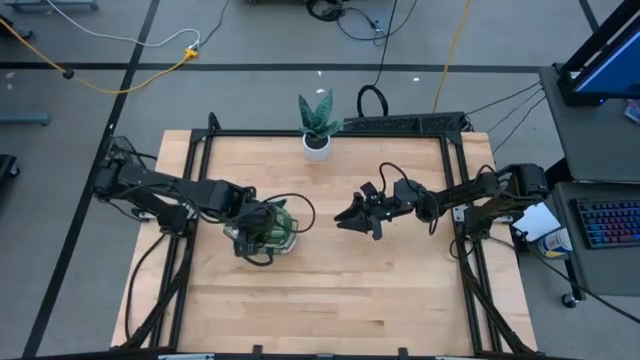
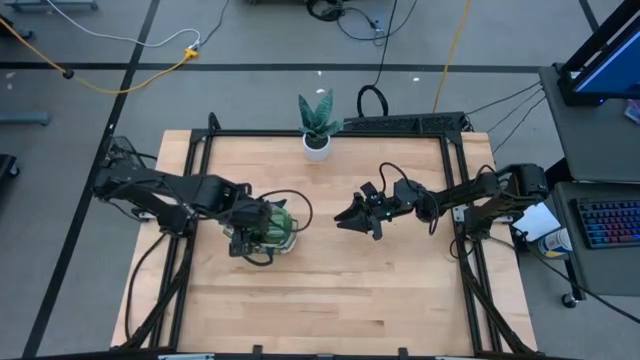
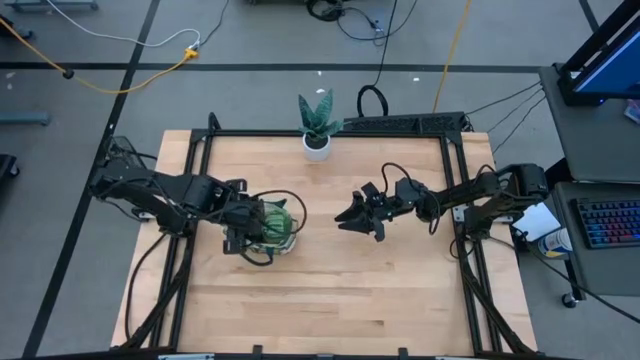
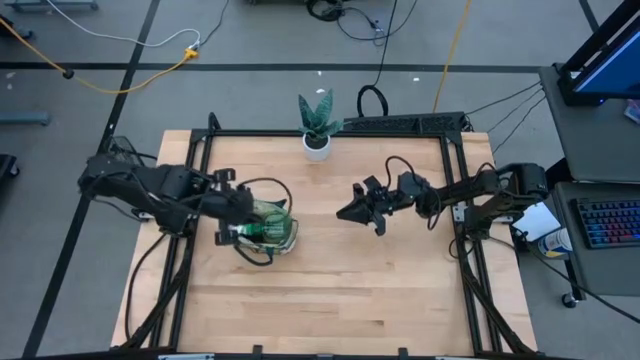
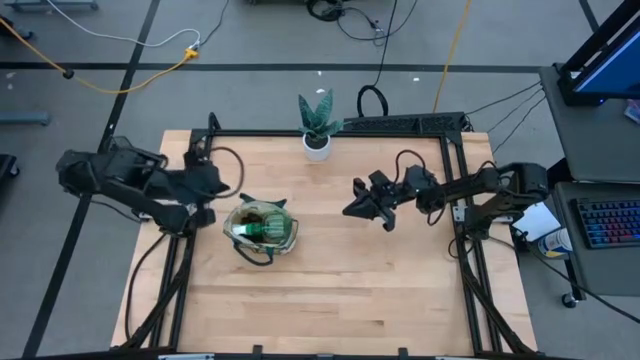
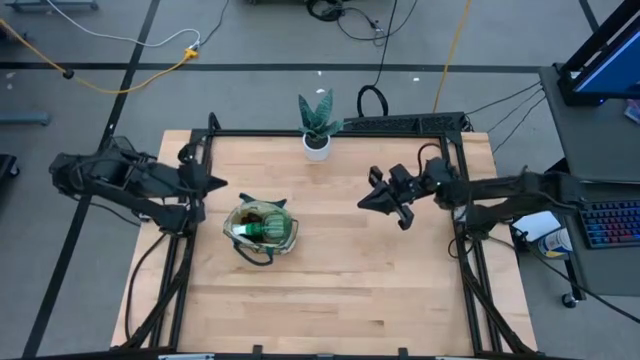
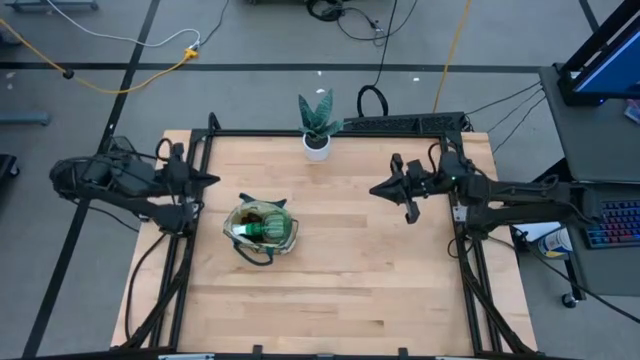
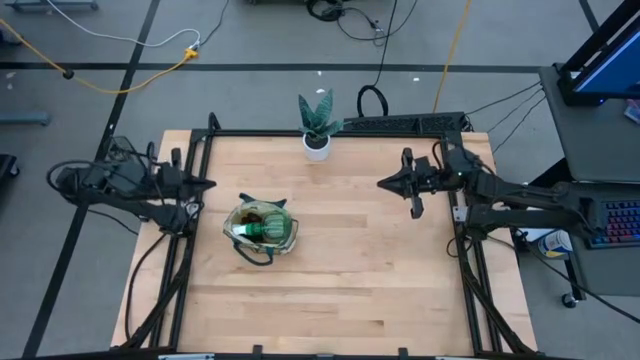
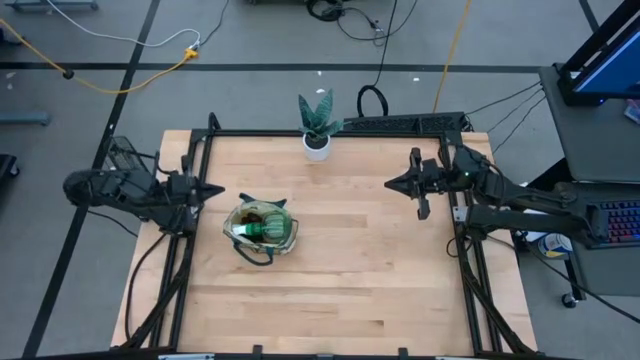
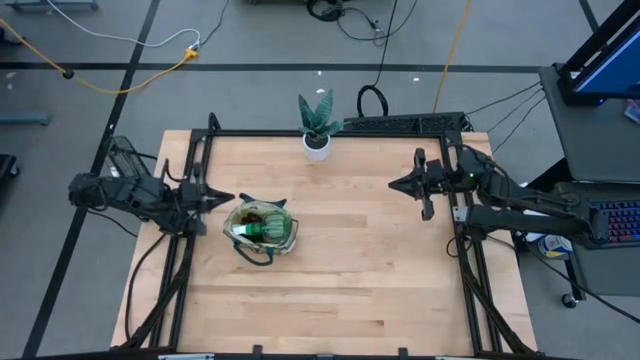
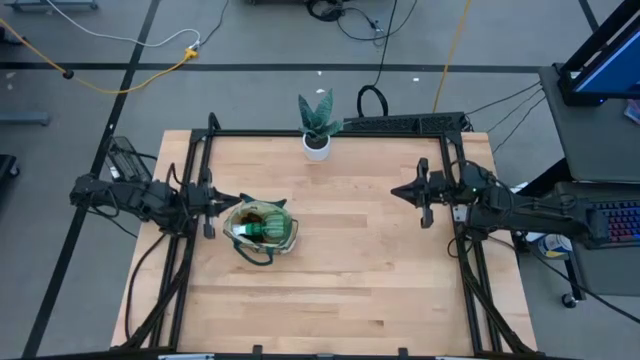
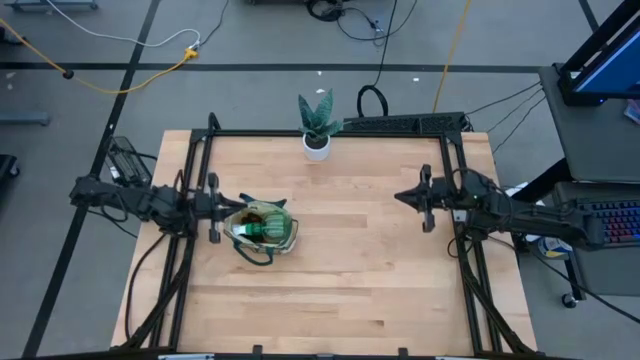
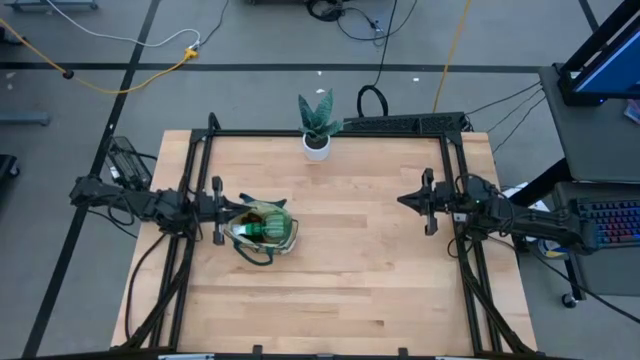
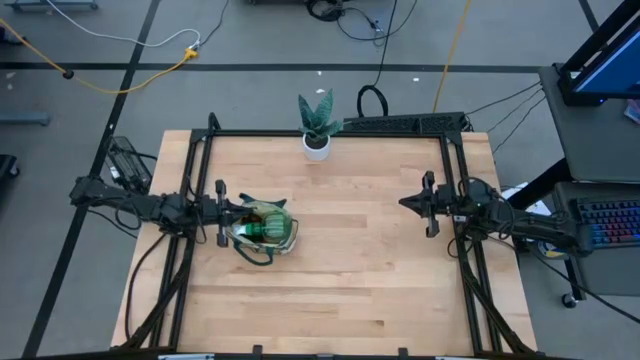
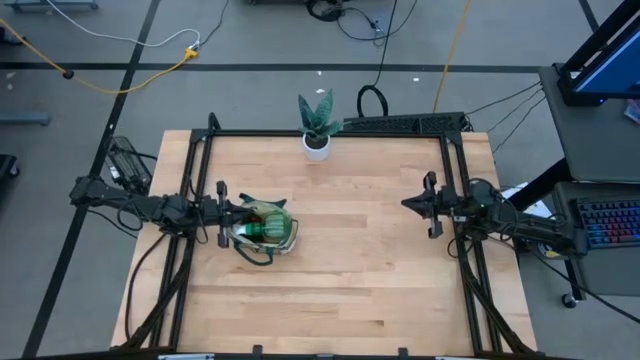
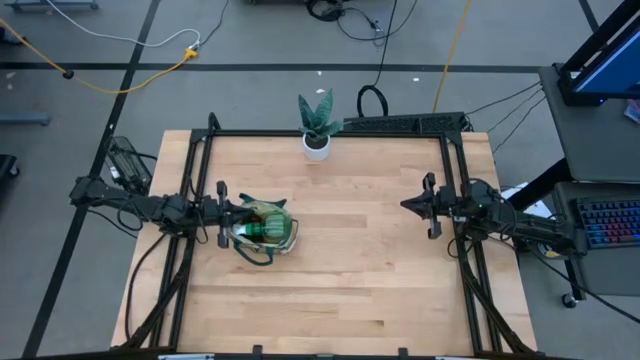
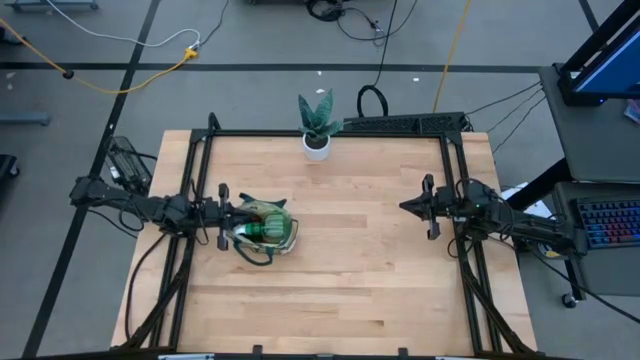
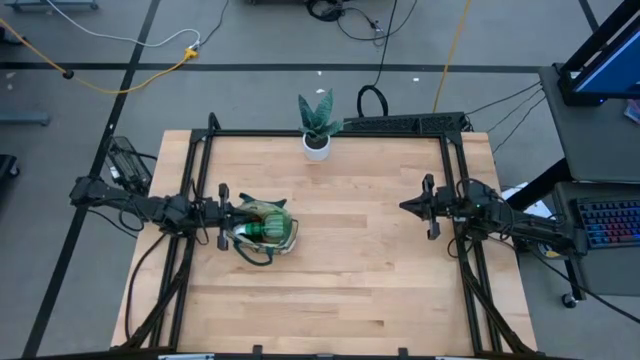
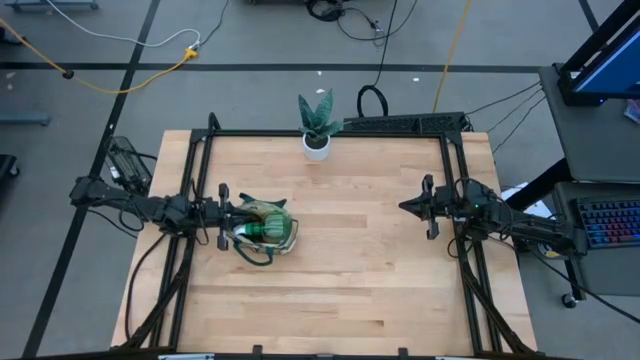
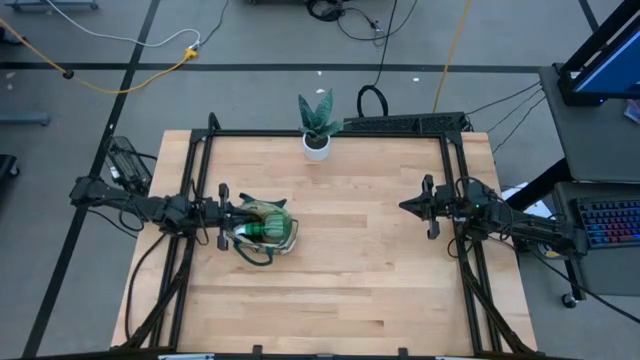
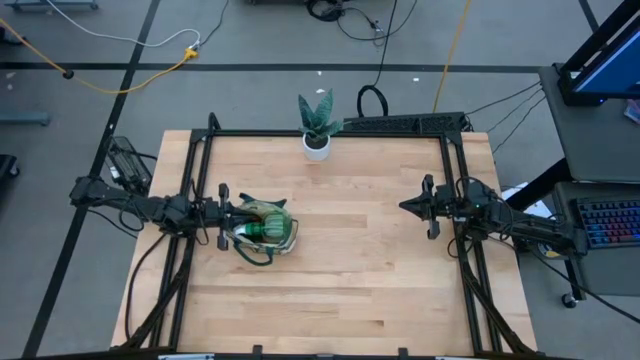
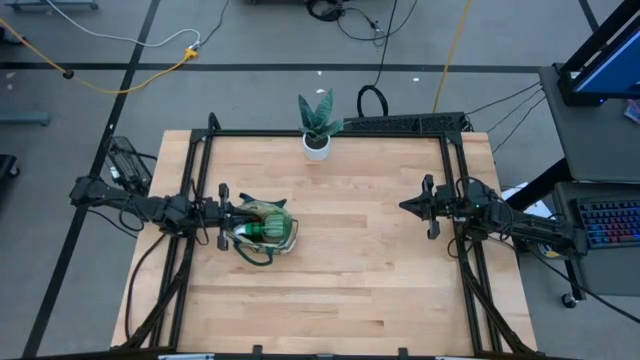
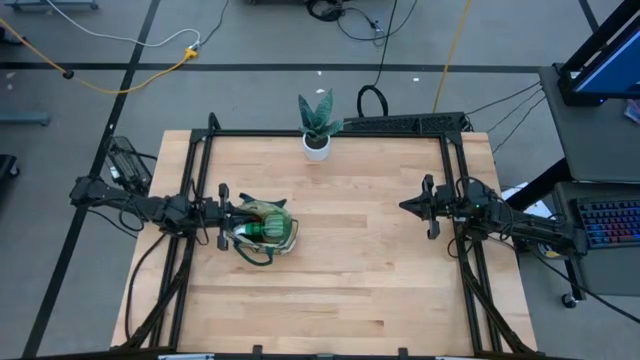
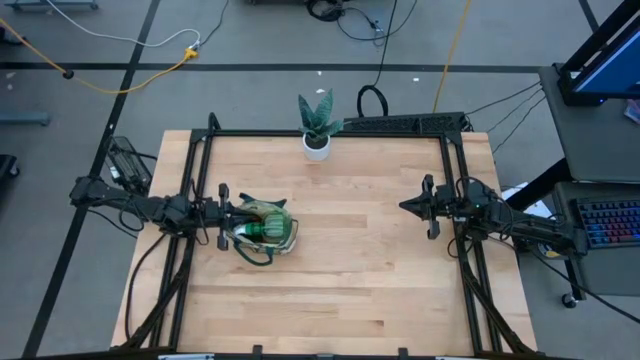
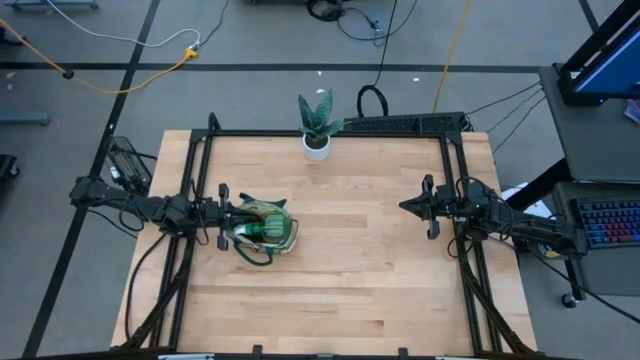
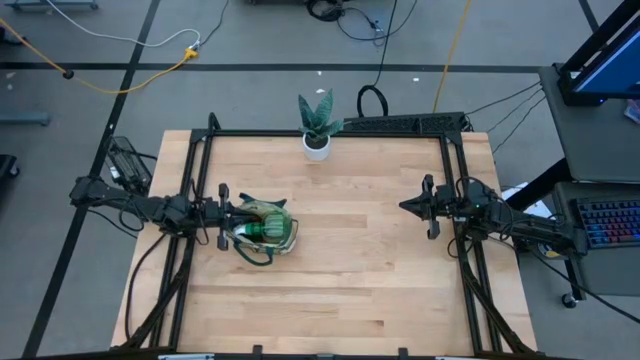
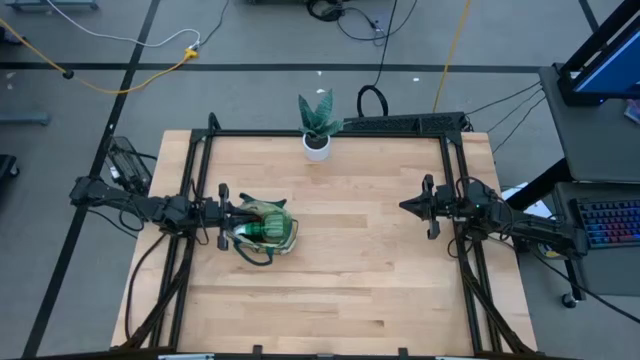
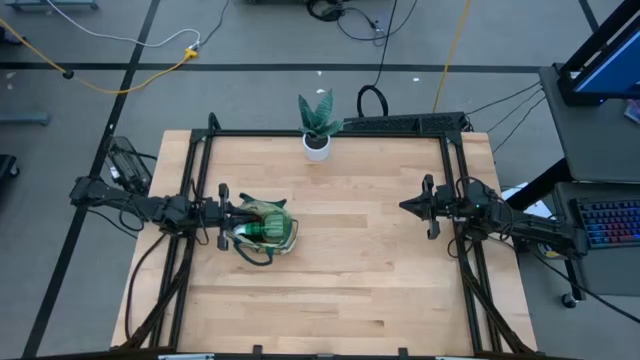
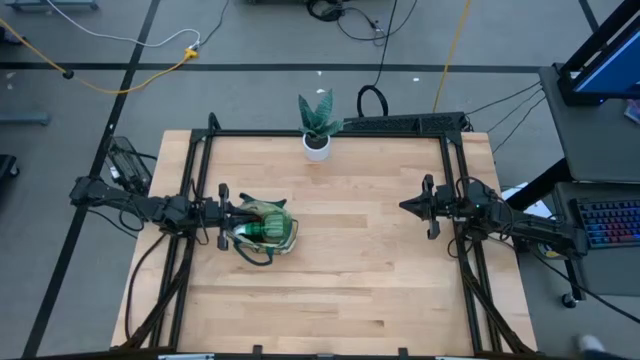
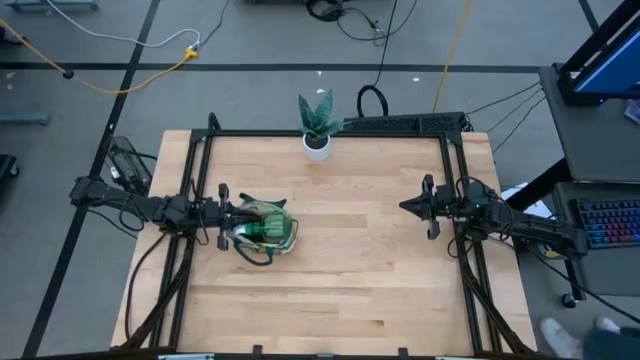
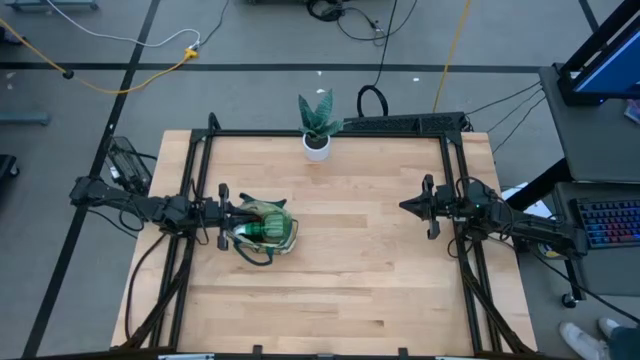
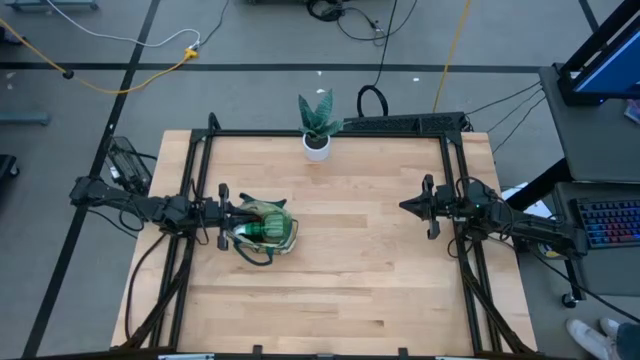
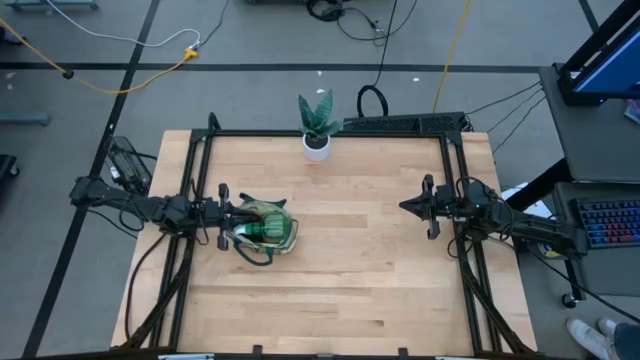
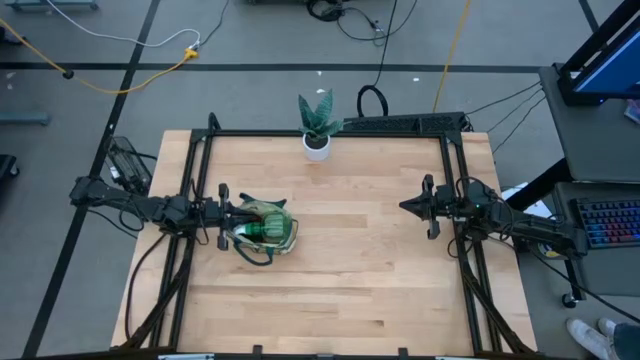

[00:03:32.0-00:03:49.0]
Task: Pick & Place Garden tools in Gardening bag
Return to Home Position

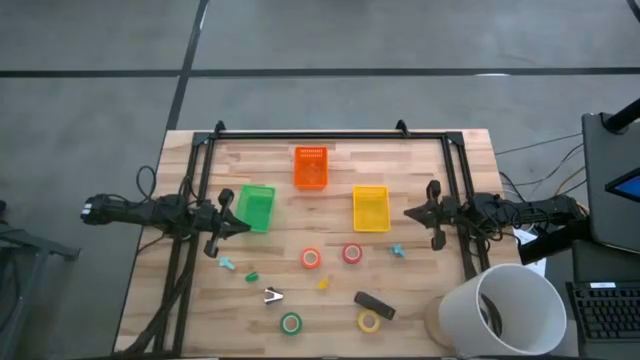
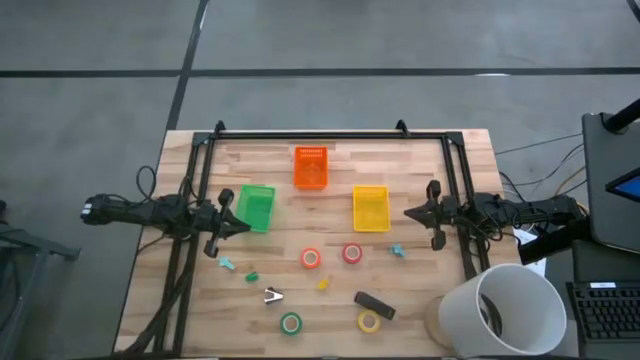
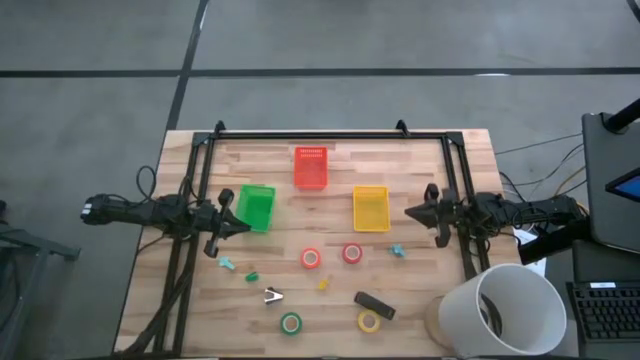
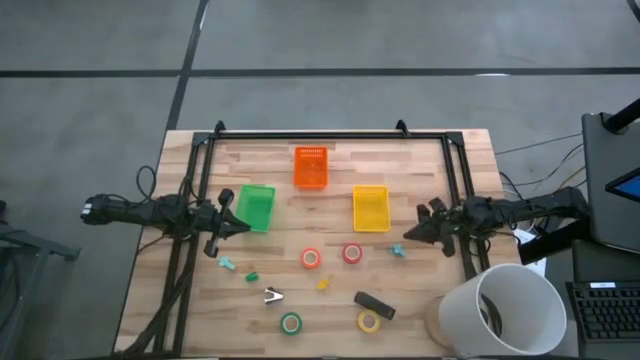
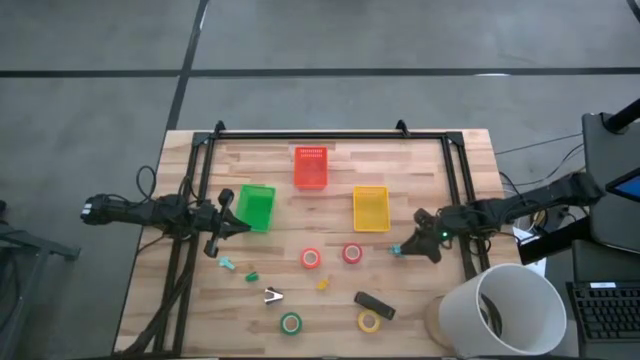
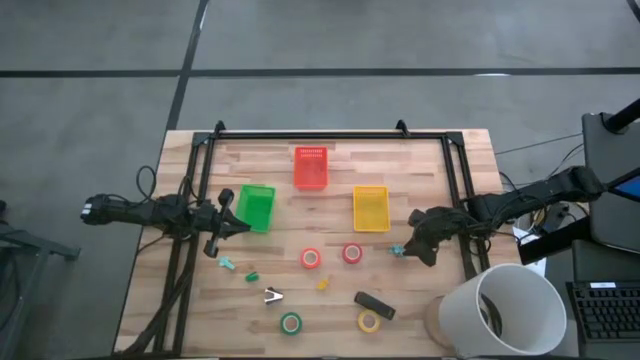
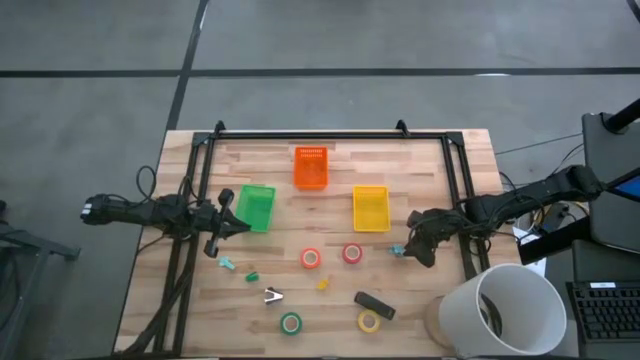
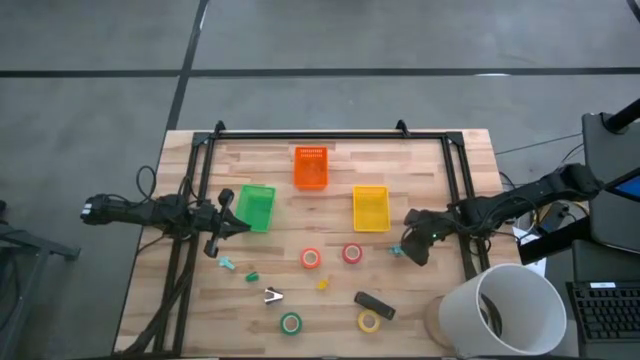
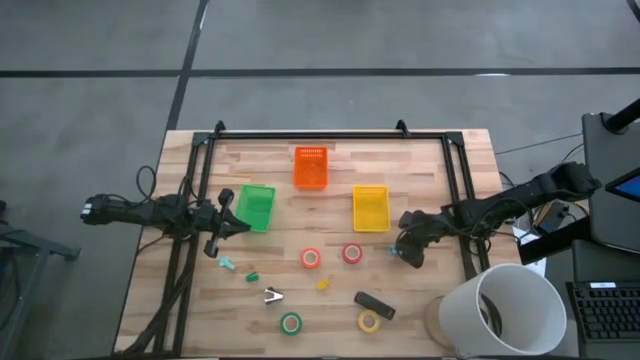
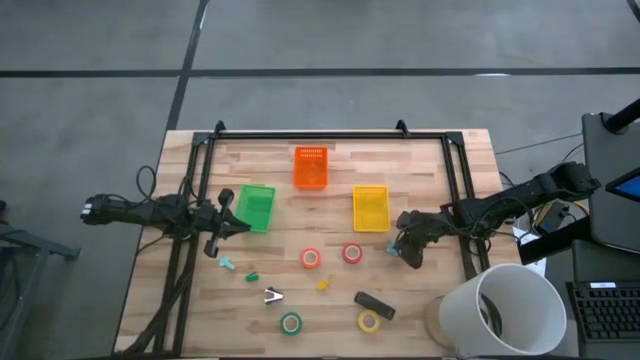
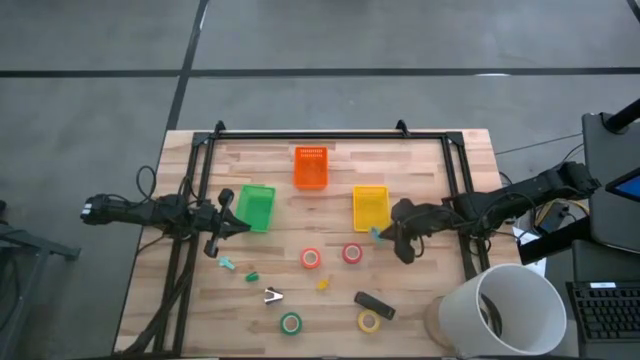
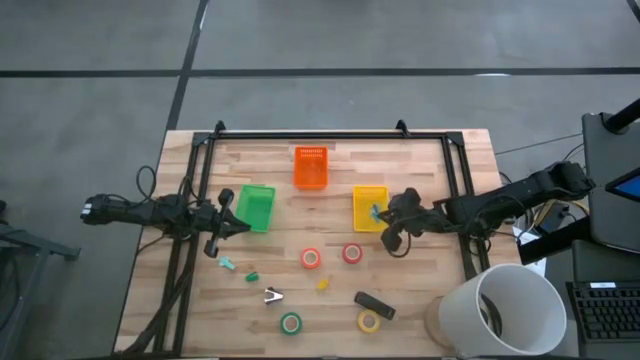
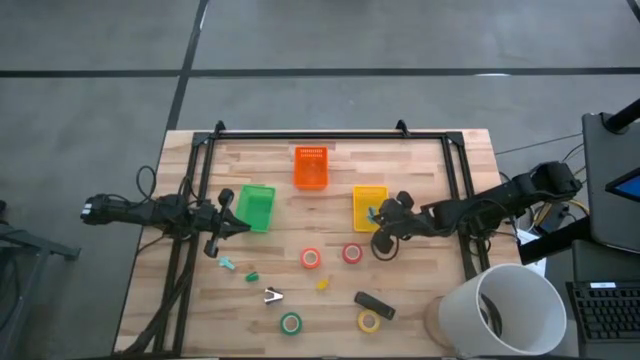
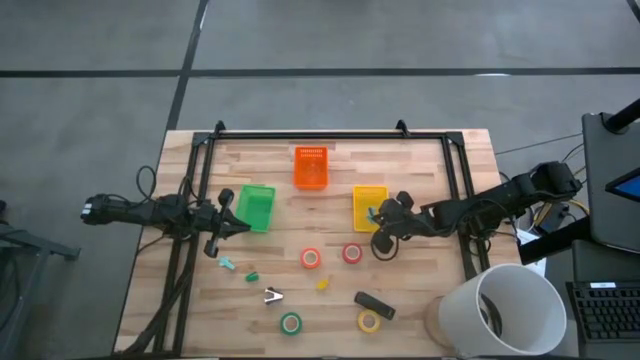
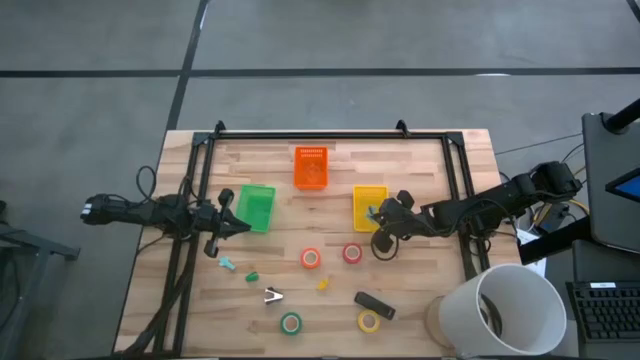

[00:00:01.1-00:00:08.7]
Task: Pick and place Stapler, Stapler remover, tape
Put the right blue staple remover into the yellow basket
